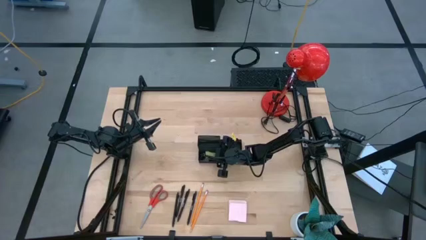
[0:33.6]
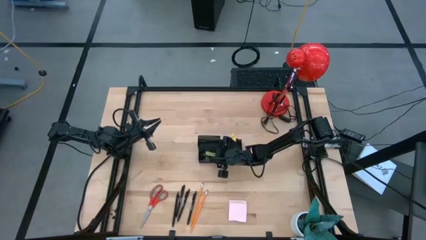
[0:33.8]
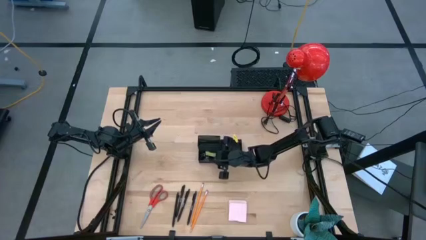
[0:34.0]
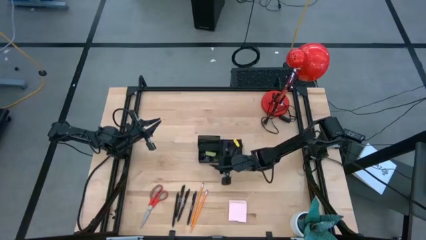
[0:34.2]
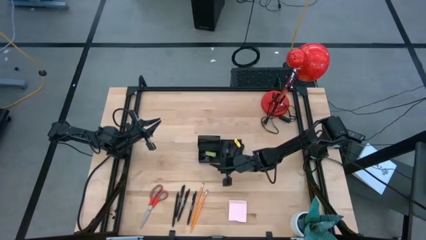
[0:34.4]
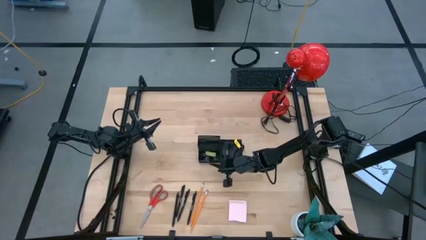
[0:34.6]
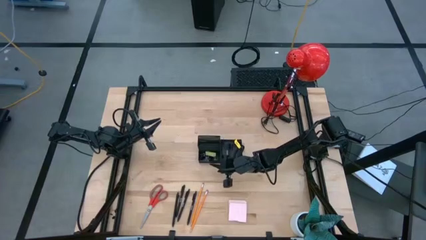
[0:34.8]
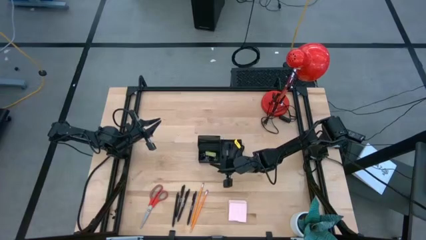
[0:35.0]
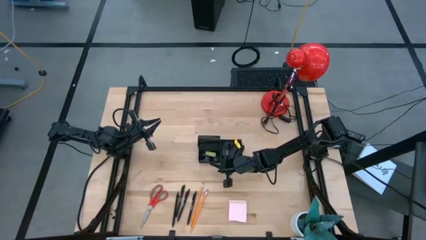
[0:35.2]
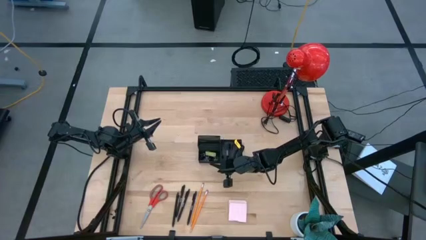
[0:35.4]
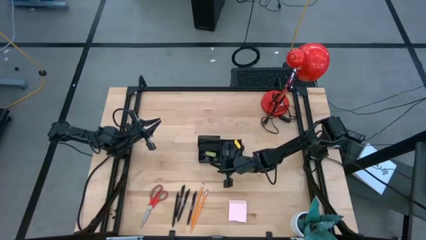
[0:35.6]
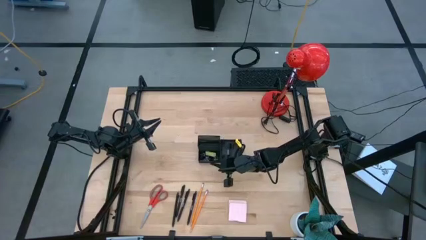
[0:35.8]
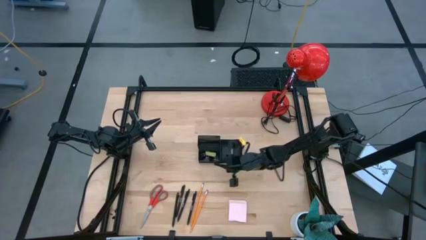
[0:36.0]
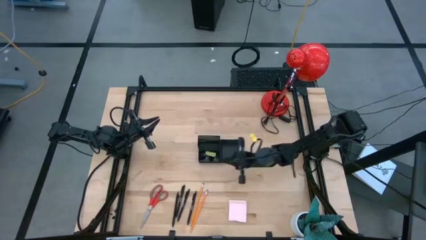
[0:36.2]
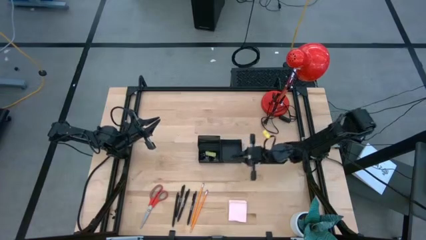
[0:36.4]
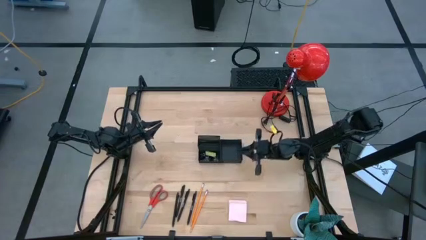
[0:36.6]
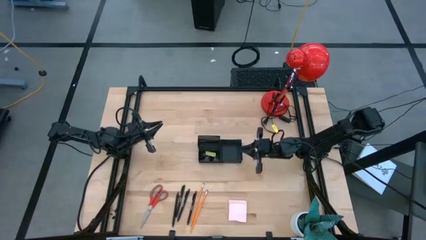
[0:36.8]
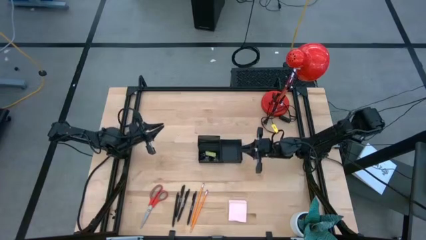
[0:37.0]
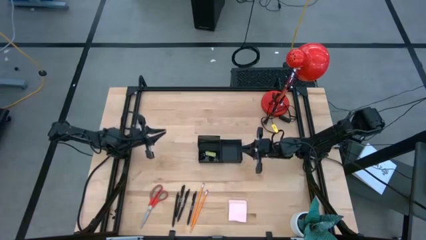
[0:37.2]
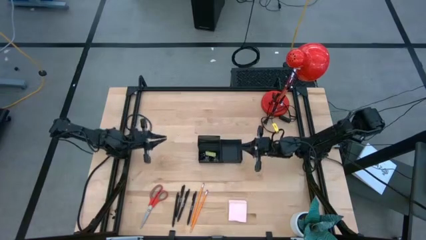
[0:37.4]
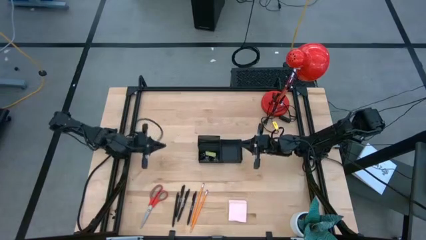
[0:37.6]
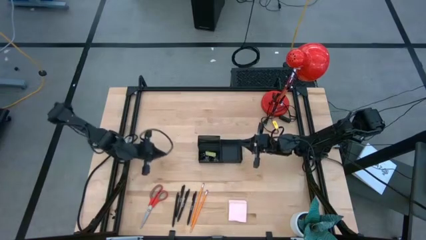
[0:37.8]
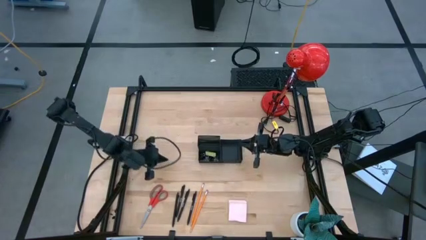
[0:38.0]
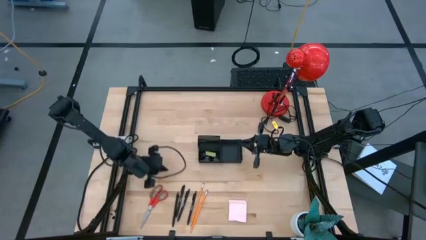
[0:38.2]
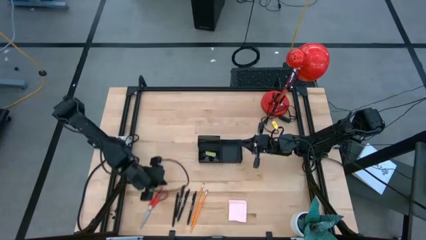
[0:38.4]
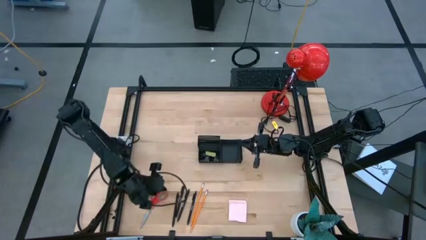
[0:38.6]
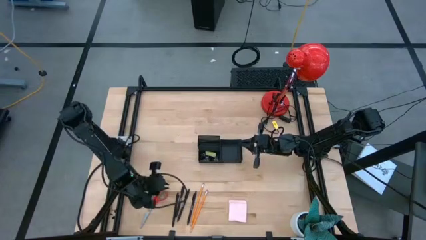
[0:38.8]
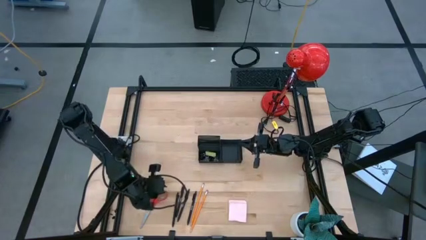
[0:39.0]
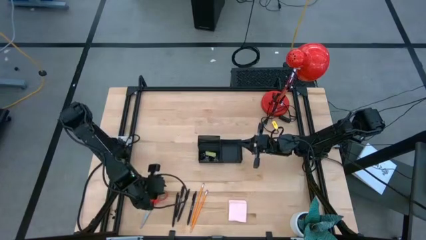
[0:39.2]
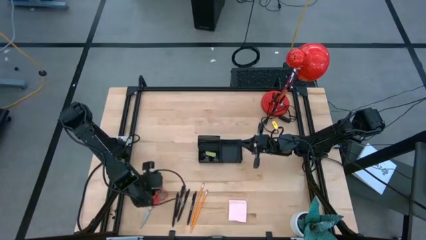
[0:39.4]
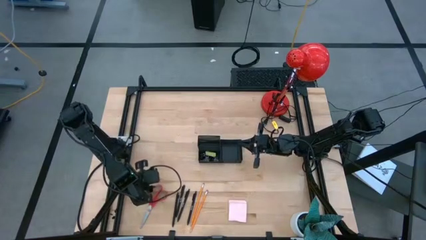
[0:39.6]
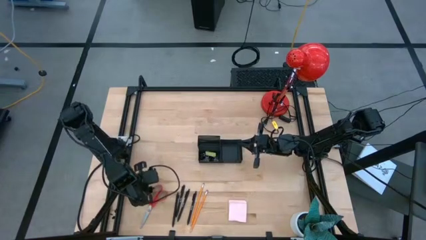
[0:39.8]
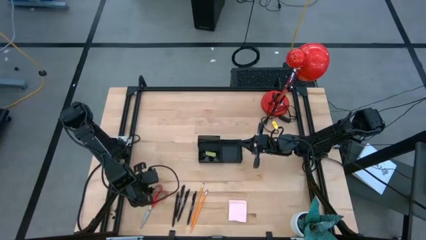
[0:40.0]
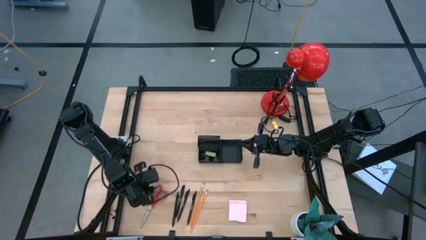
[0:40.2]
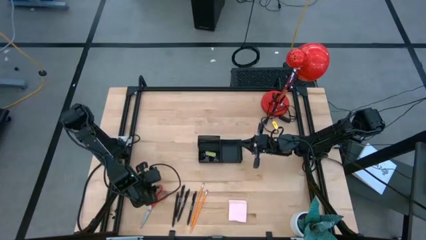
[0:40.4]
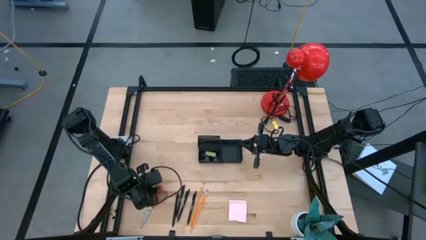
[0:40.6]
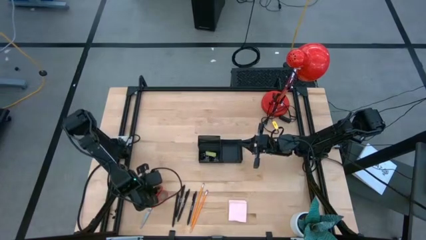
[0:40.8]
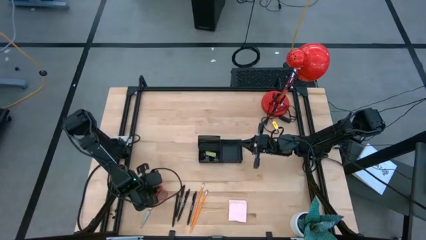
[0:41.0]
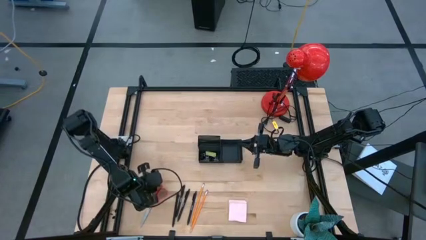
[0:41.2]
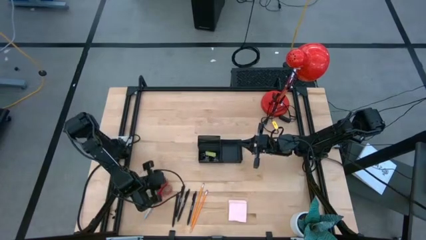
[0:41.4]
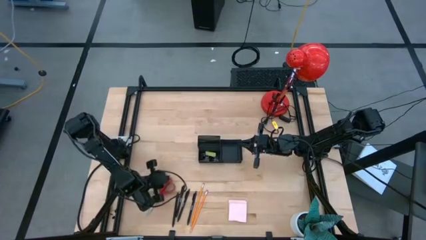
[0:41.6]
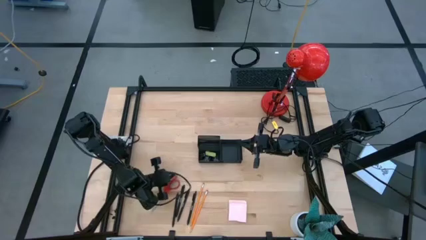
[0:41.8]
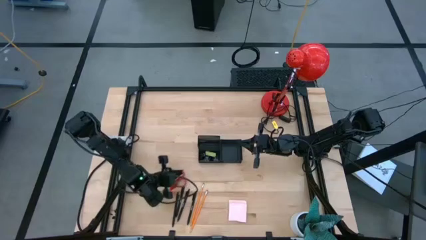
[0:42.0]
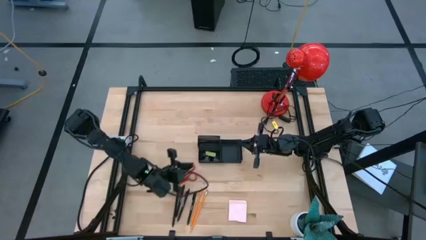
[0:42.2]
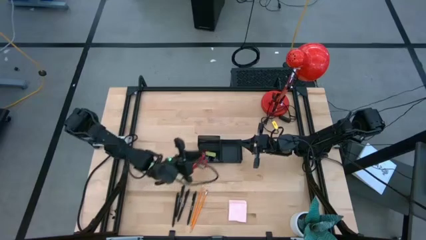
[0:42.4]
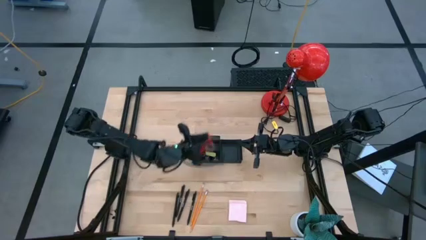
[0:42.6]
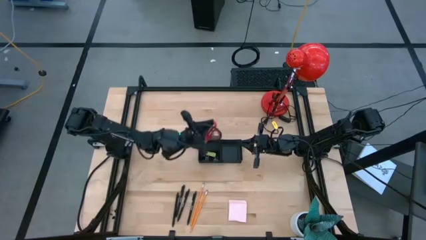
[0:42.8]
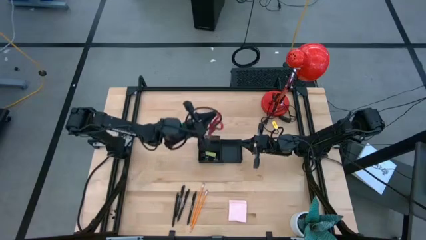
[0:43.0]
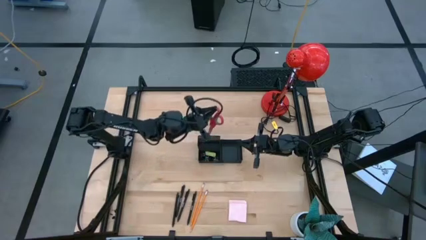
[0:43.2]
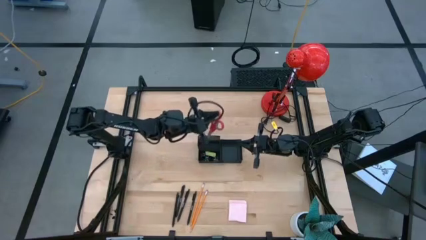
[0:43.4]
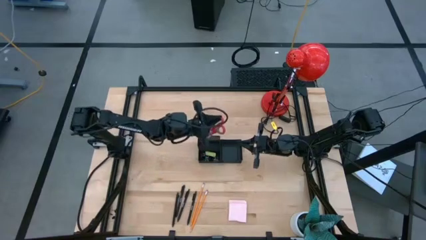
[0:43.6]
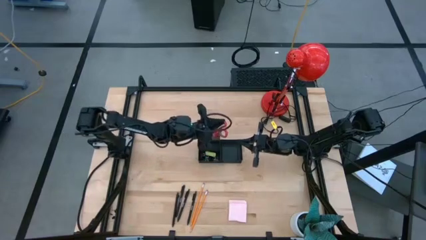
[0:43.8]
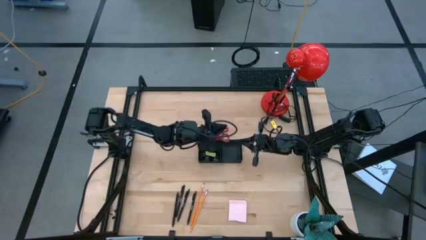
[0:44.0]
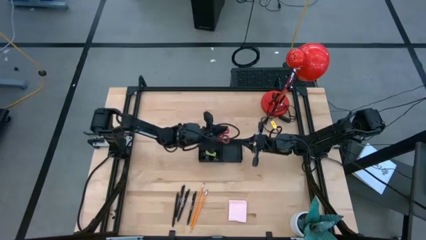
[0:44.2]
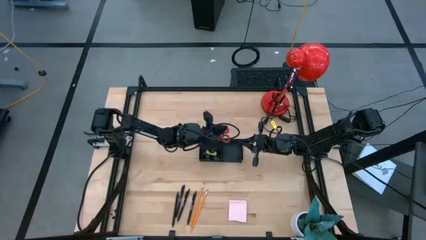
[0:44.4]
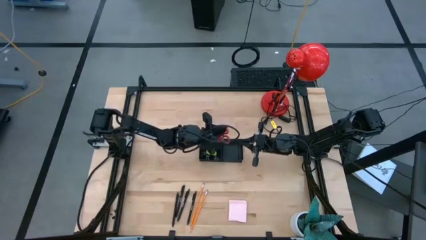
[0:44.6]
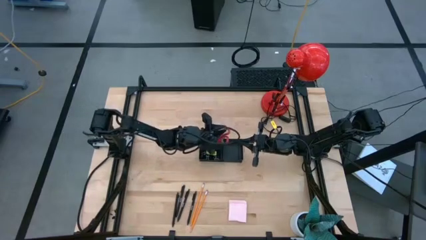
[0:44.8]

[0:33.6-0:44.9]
Task: Pick and place office supplies into organizer
Put the red scissors into the black desk organizer

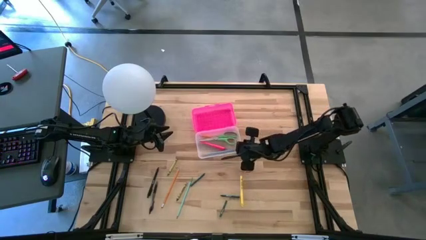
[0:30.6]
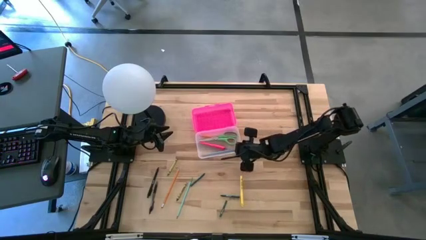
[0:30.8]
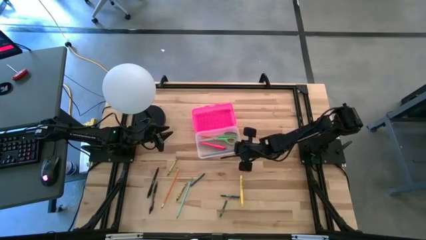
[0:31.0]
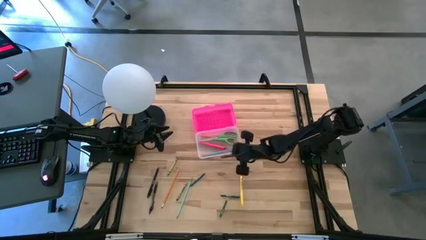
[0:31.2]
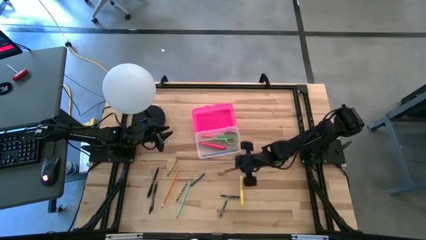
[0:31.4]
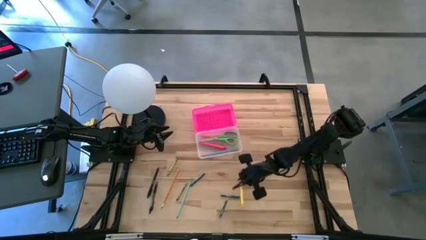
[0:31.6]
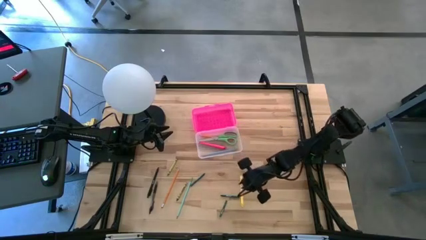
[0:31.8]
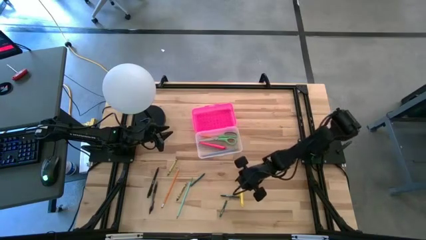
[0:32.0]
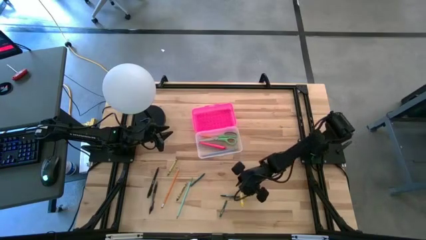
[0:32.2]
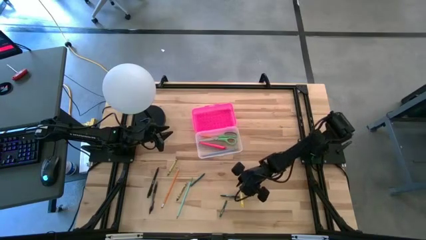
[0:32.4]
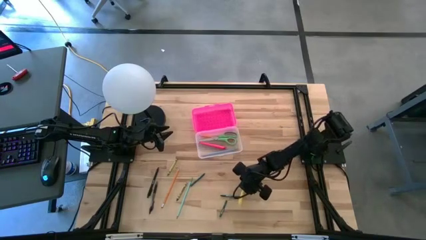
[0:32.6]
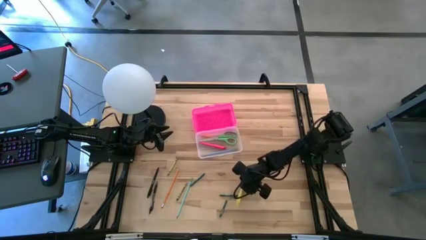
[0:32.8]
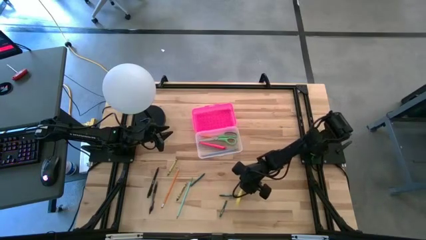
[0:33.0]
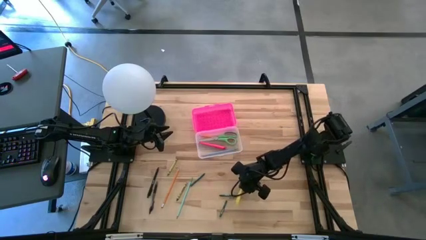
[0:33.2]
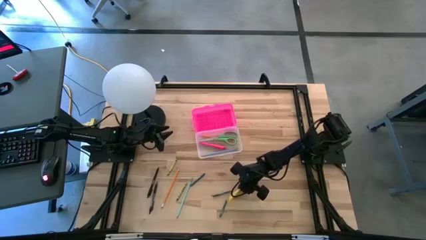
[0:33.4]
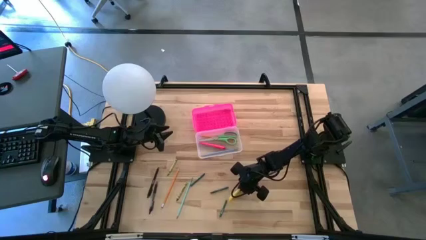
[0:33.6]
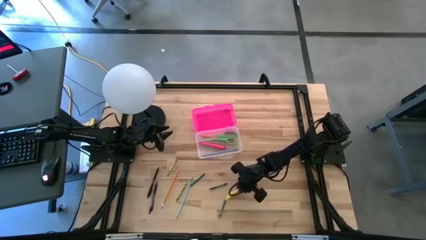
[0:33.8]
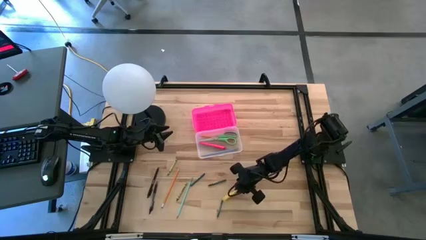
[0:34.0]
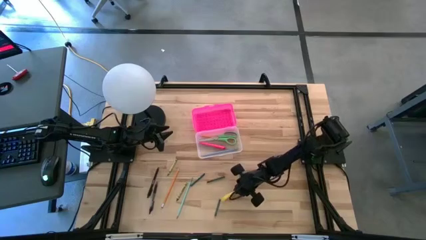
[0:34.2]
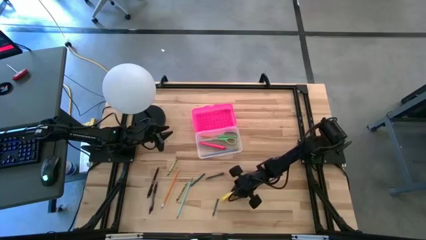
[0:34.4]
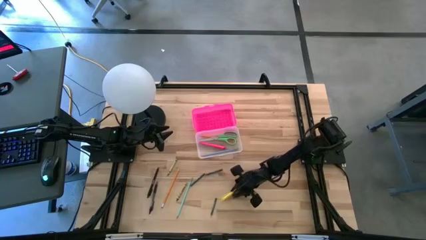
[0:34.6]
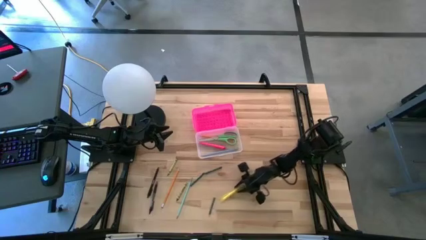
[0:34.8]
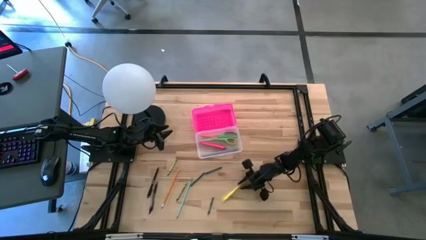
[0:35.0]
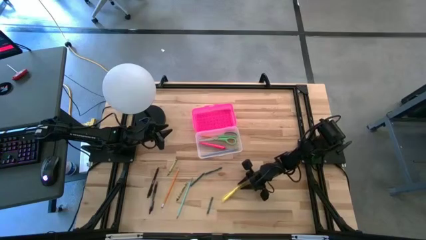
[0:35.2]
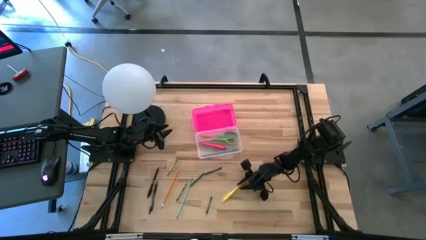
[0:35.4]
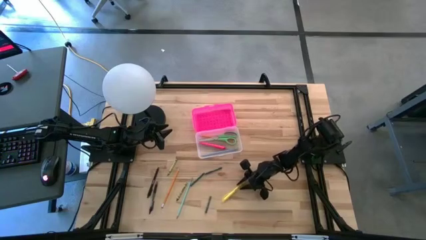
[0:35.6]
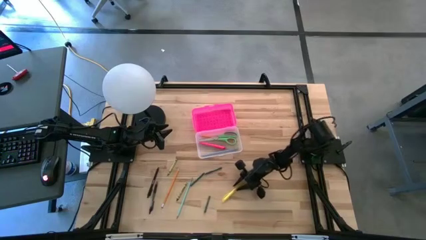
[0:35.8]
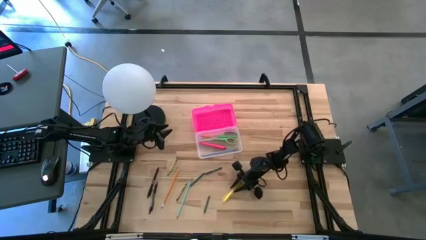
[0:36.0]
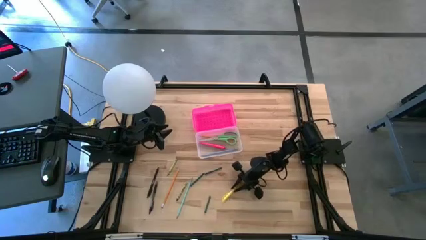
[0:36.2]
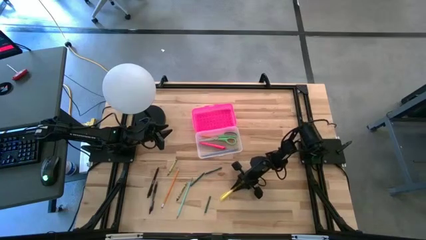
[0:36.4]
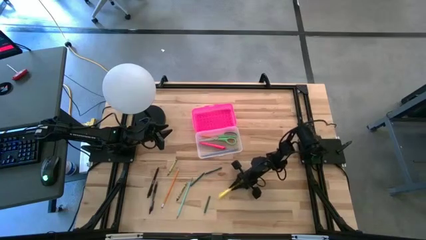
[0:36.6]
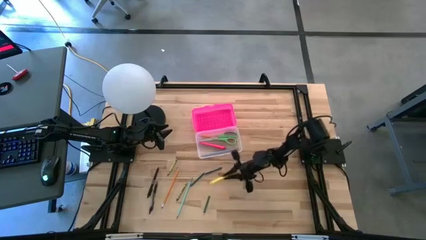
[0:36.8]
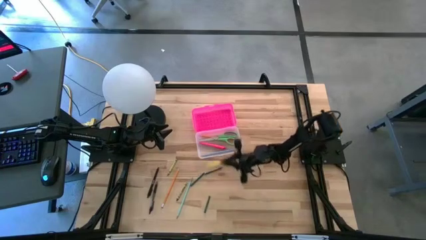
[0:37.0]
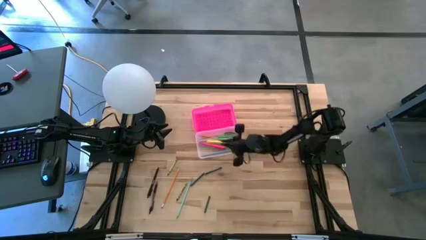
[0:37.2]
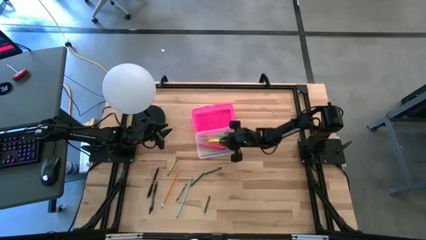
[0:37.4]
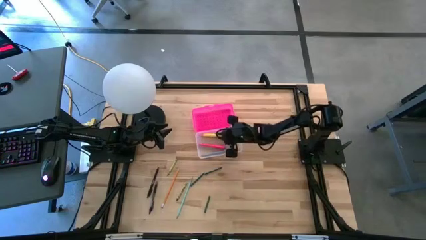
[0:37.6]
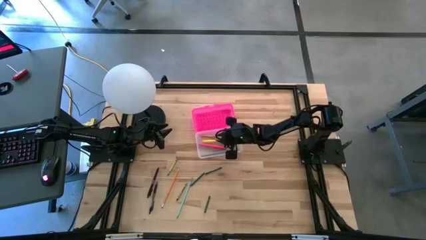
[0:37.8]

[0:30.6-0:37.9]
Task: Pick & place school supplies into a supply box
Put the yellow pen into the pink supply box
